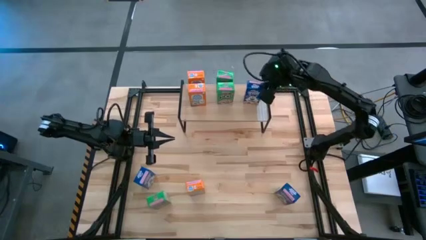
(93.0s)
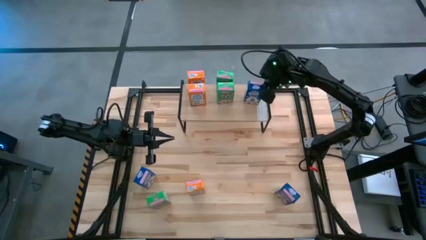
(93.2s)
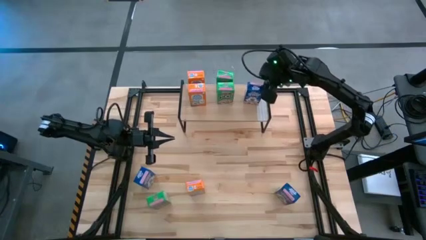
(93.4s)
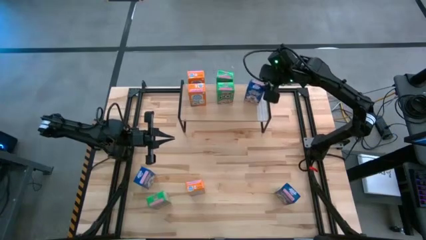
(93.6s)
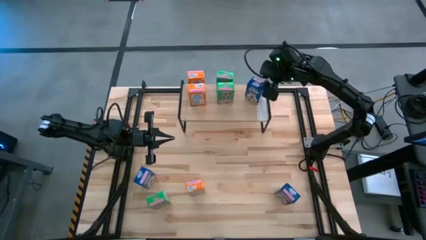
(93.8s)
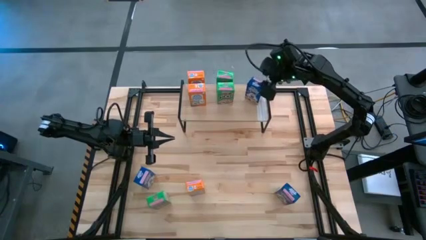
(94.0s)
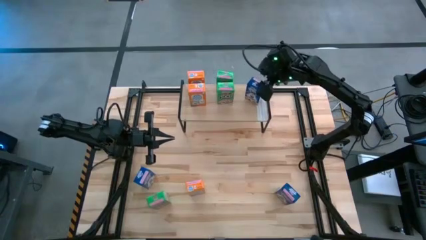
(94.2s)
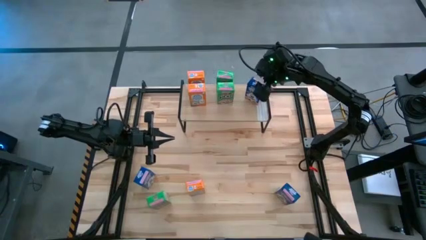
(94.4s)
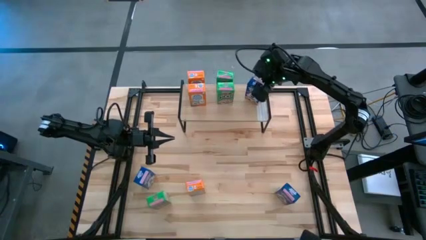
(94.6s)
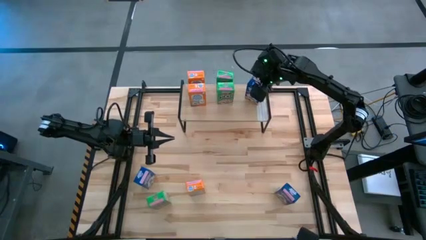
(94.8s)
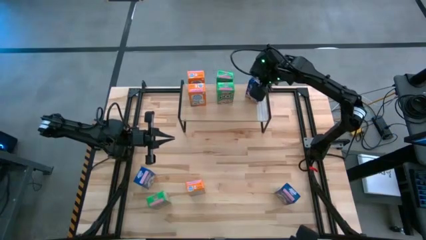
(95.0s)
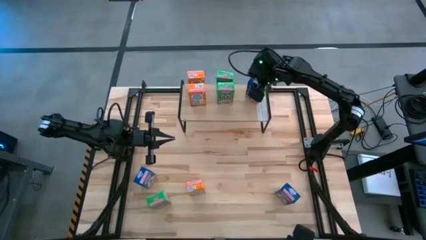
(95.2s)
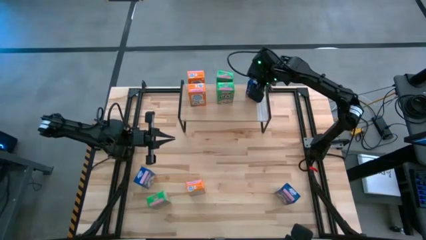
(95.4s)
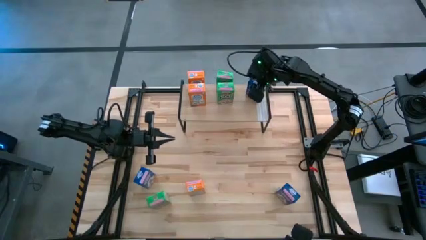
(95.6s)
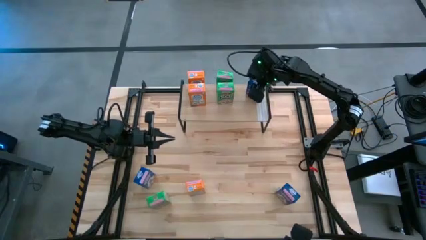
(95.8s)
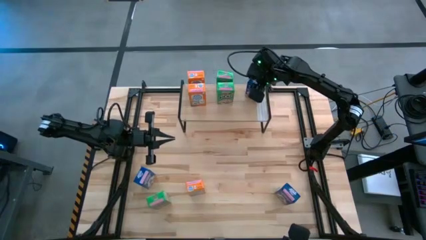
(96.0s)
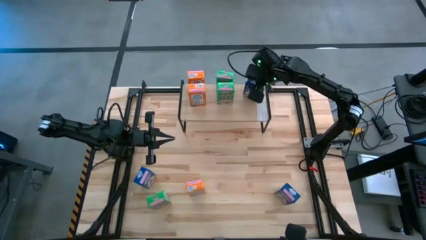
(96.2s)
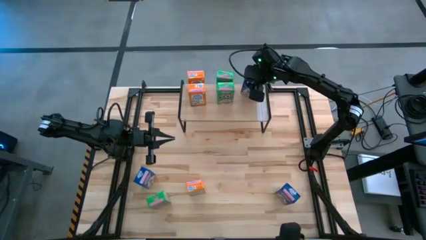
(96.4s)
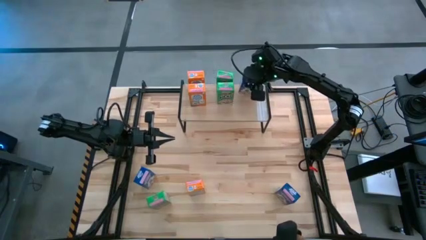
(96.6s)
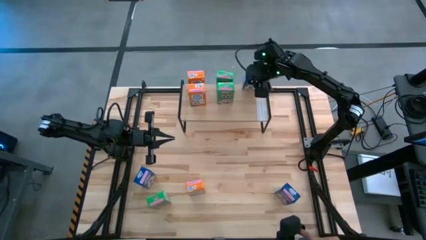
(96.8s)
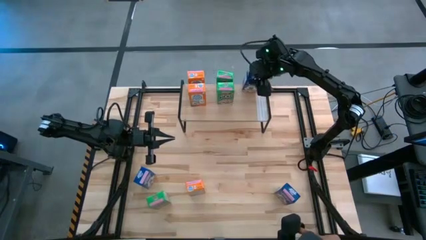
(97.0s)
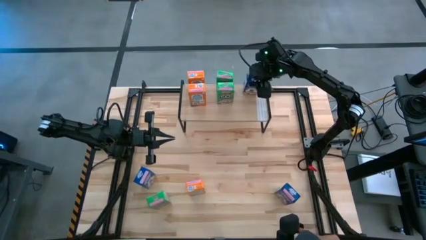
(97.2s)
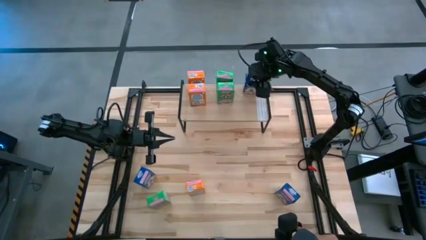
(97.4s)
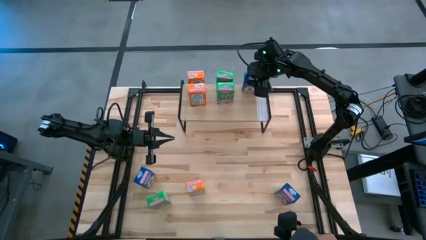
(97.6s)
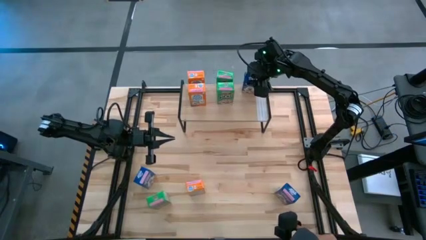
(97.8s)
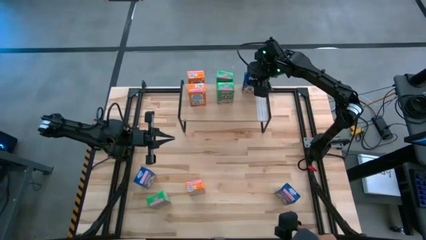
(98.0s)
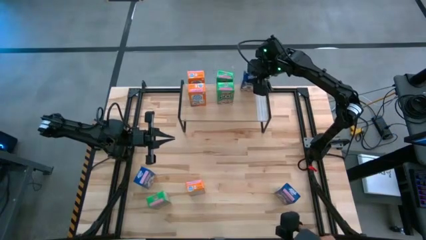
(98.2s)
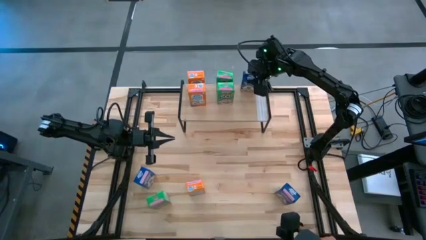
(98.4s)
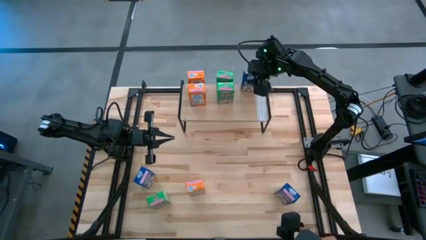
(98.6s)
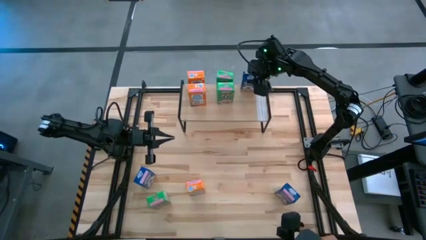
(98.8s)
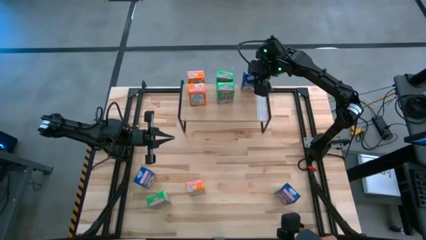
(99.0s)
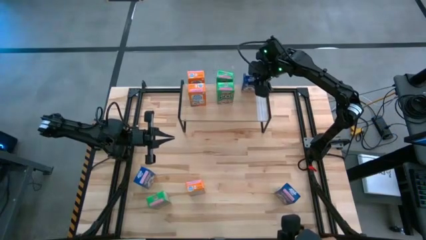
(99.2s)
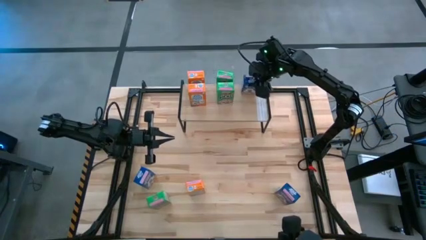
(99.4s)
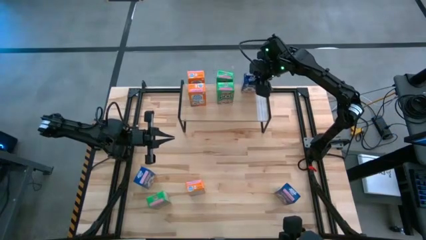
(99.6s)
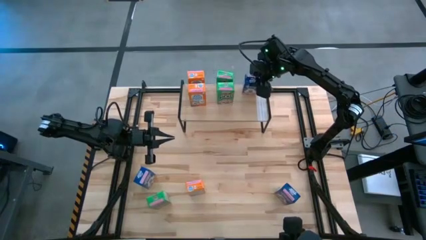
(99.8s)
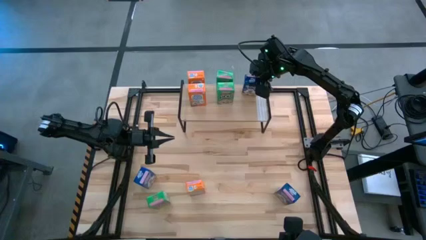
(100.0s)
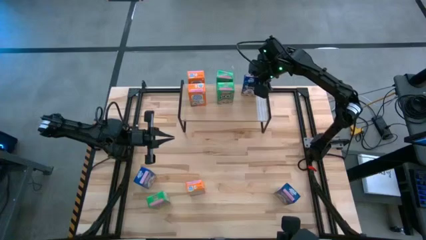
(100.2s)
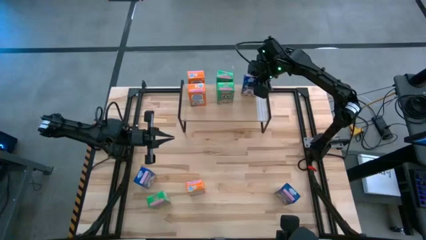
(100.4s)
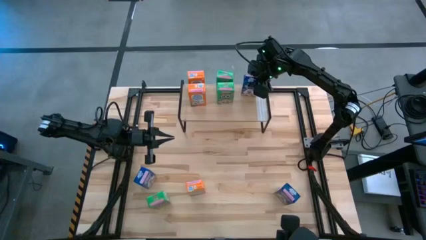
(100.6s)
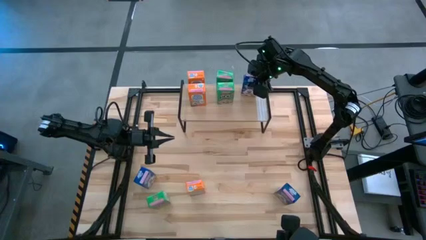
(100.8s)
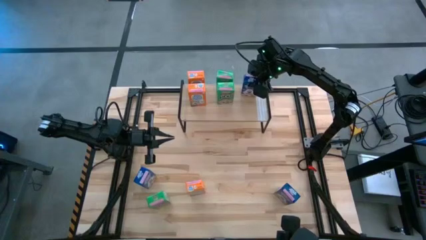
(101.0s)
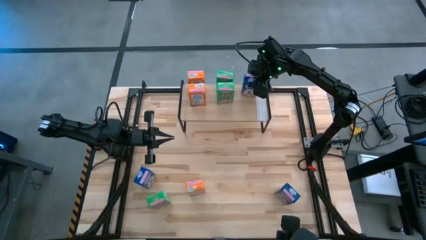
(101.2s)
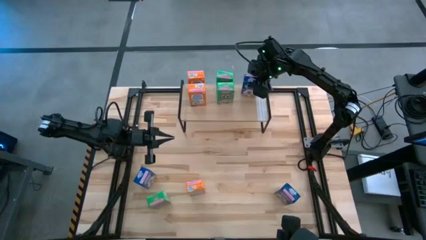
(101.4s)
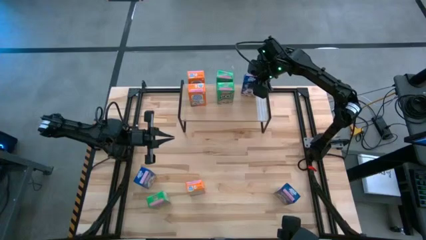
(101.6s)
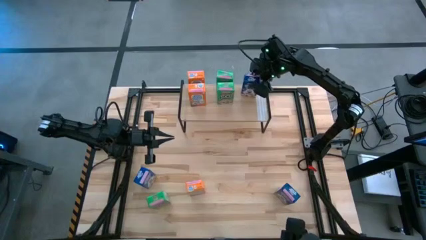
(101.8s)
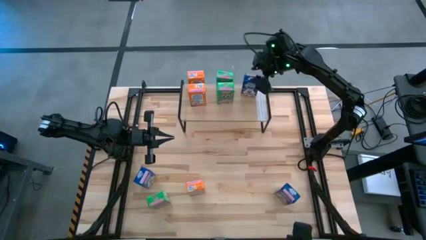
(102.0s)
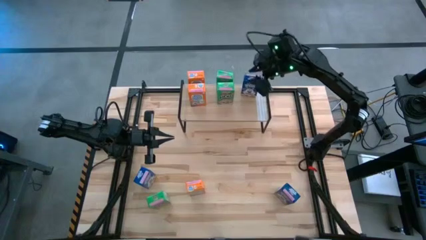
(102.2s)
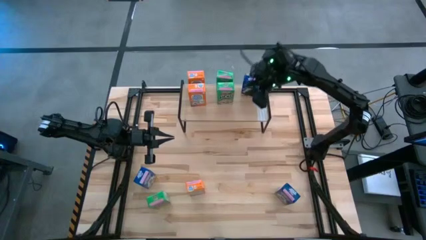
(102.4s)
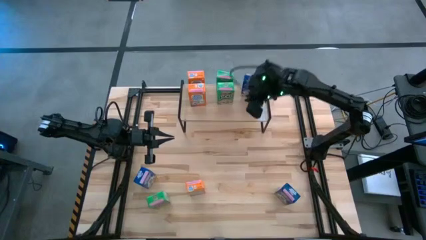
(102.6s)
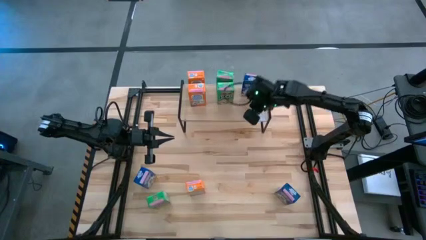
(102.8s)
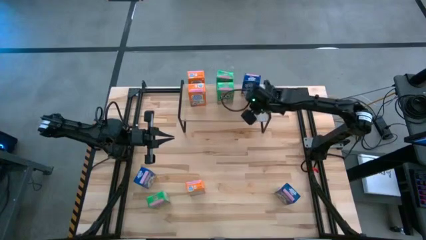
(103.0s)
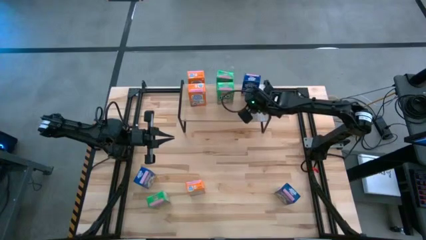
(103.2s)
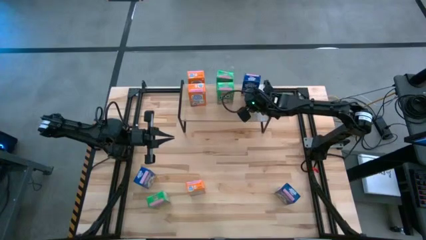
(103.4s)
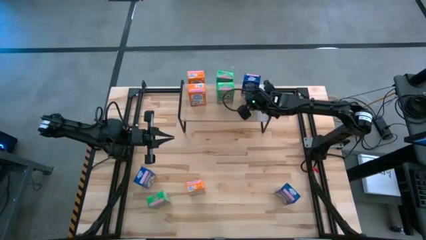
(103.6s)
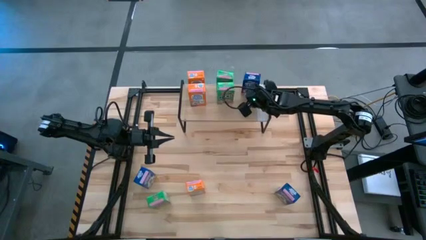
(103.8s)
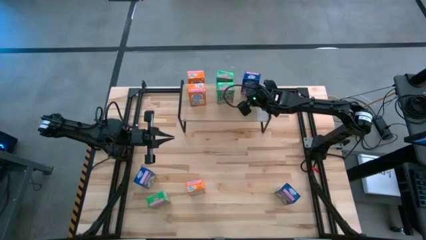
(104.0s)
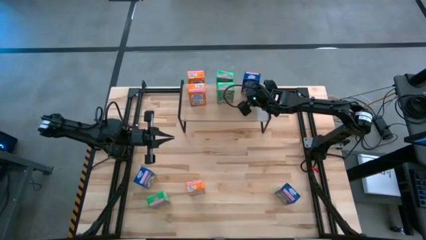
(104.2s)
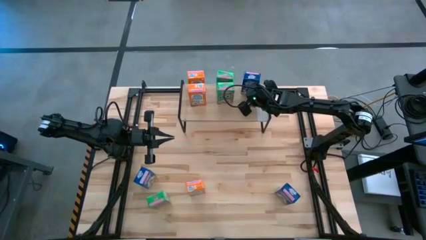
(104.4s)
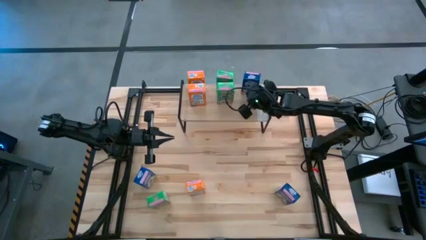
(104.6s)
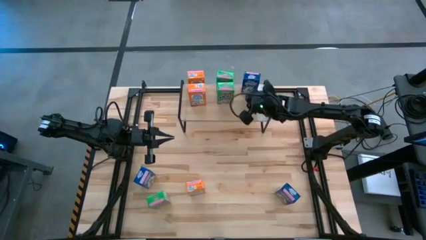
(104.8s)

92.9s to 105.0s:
Task: Stack cereal on shelf
Put the top right blue cereal box on the shelf
